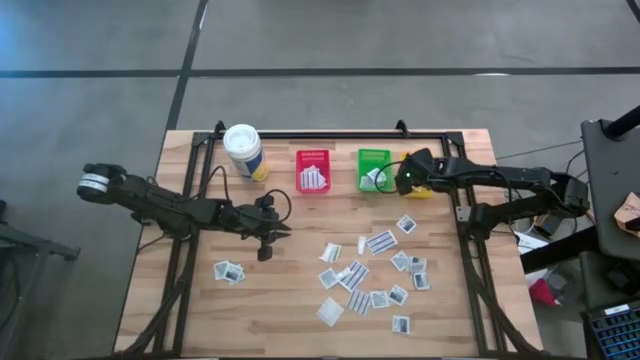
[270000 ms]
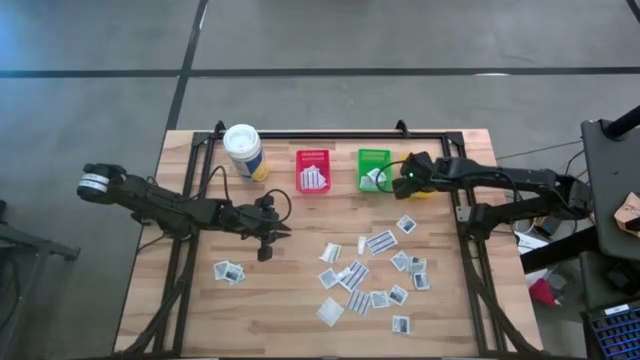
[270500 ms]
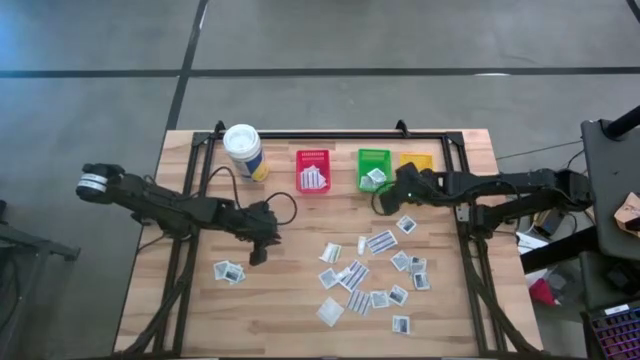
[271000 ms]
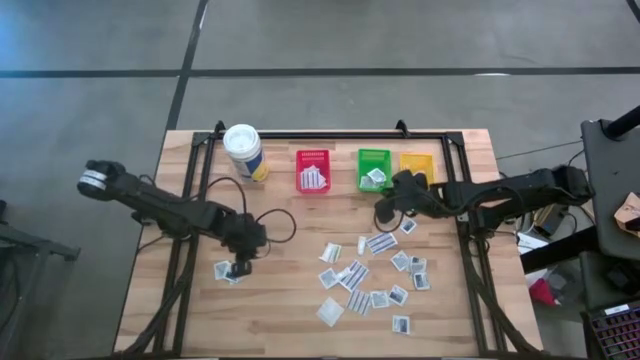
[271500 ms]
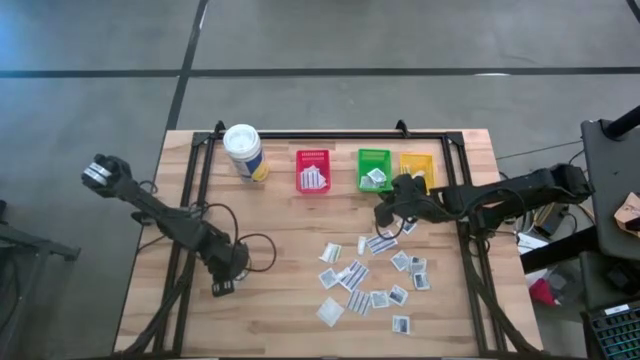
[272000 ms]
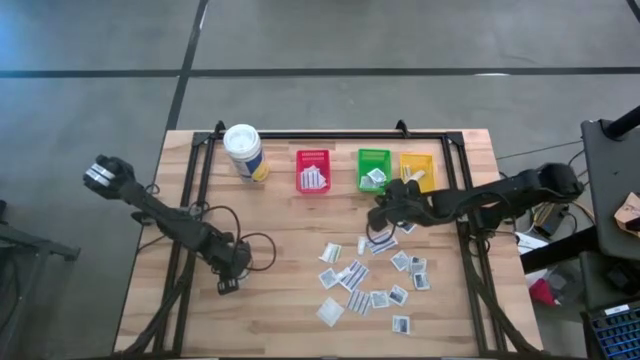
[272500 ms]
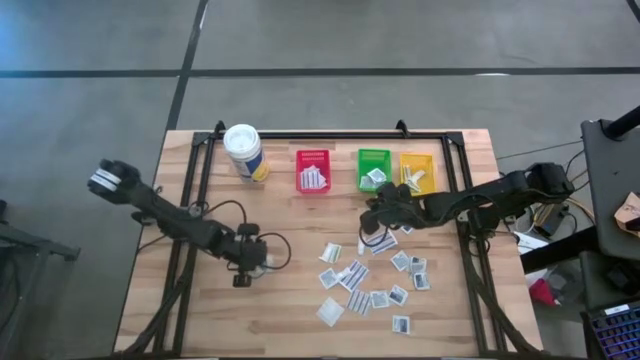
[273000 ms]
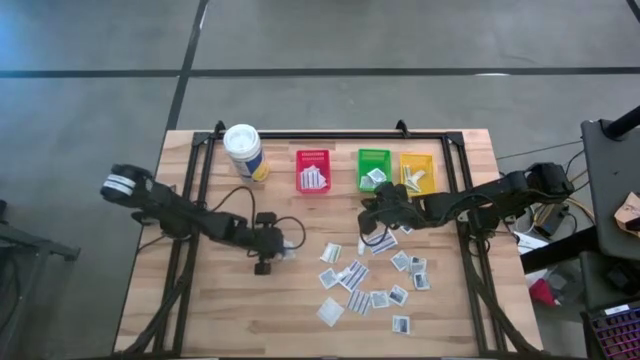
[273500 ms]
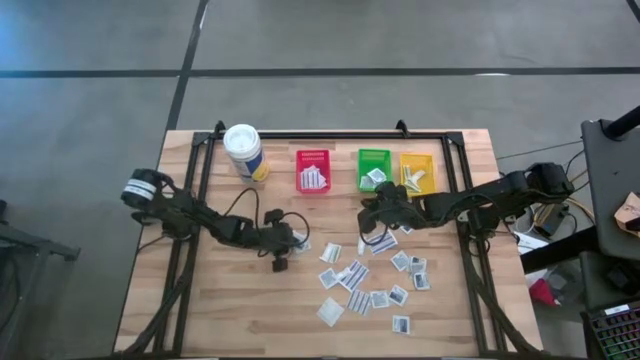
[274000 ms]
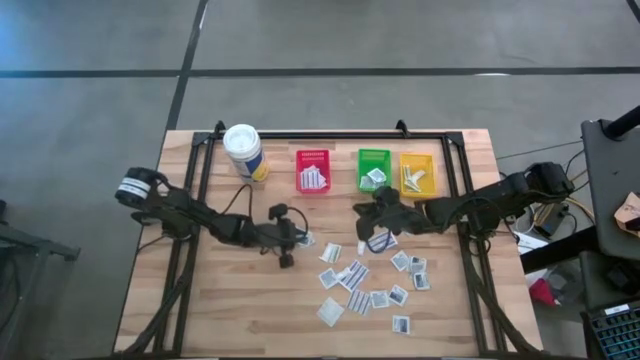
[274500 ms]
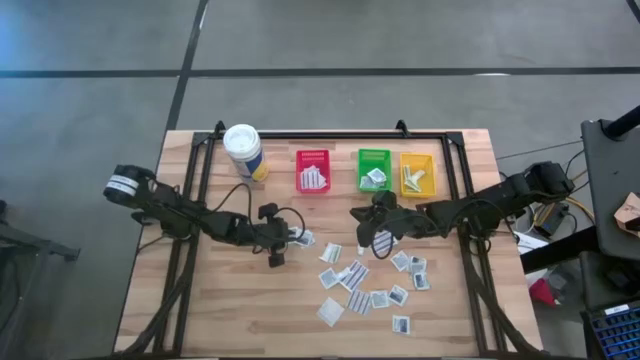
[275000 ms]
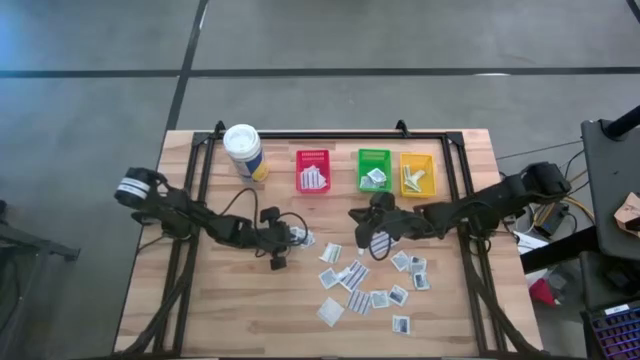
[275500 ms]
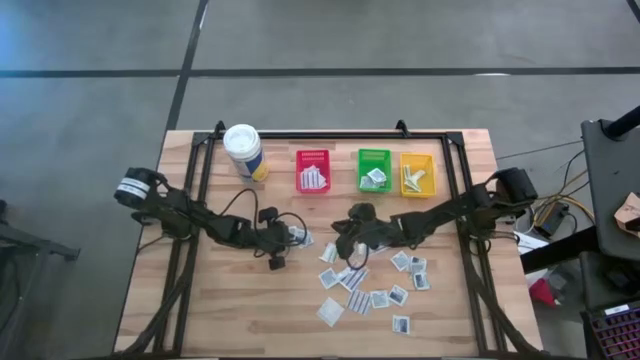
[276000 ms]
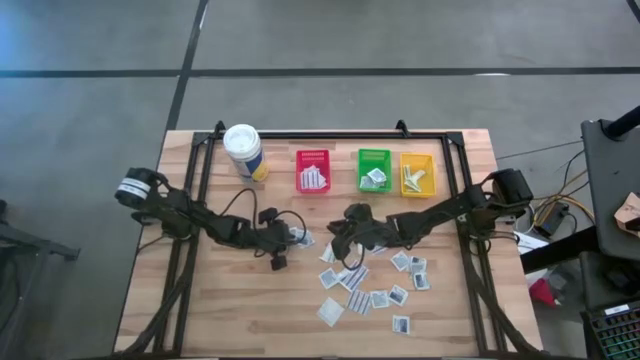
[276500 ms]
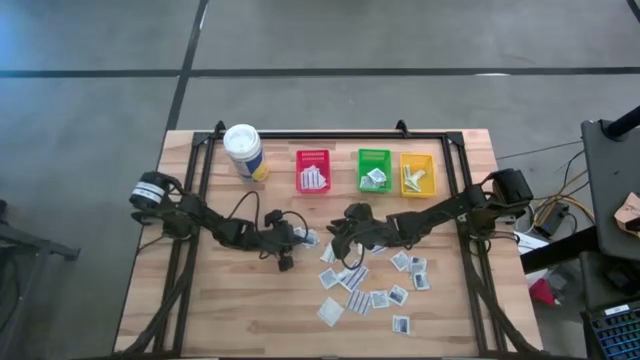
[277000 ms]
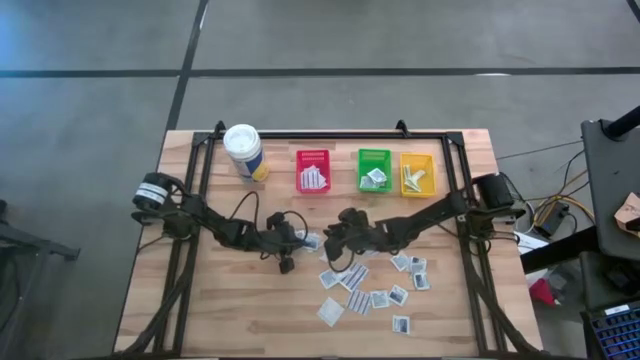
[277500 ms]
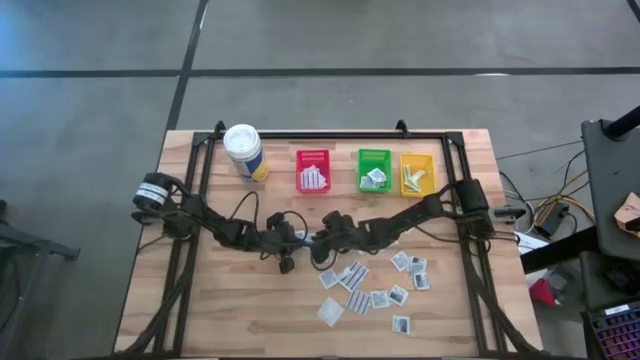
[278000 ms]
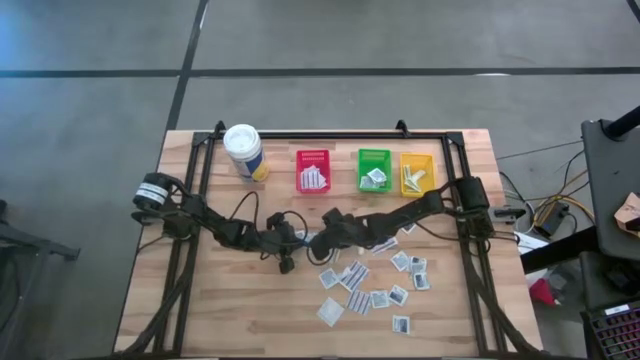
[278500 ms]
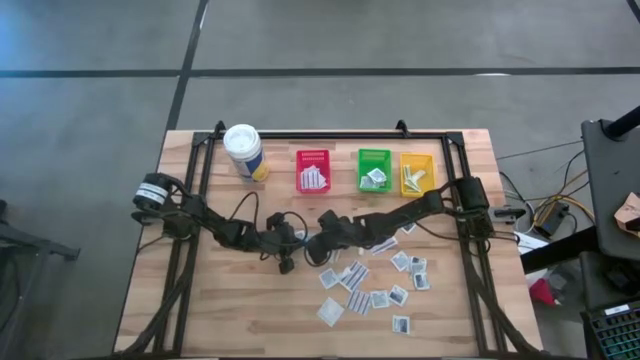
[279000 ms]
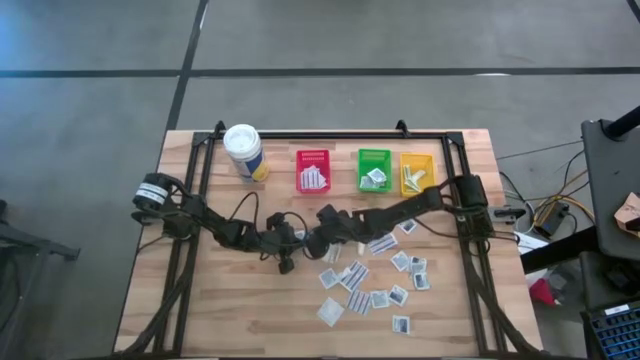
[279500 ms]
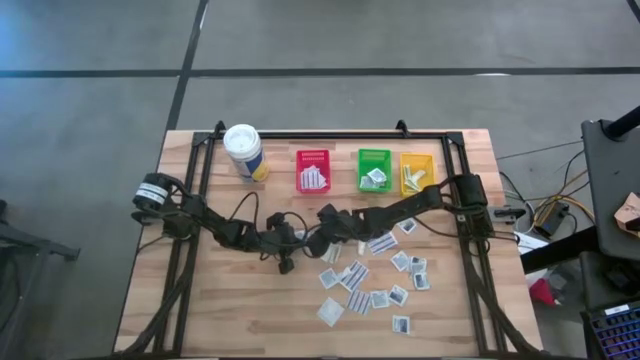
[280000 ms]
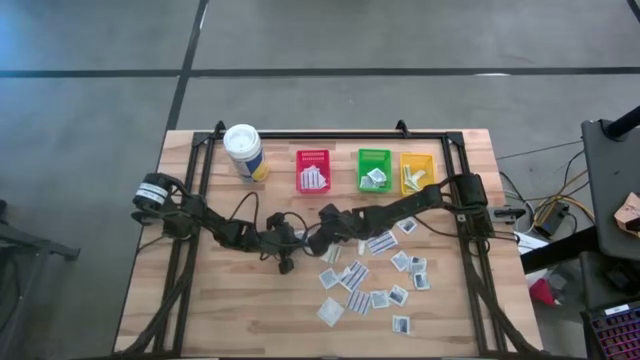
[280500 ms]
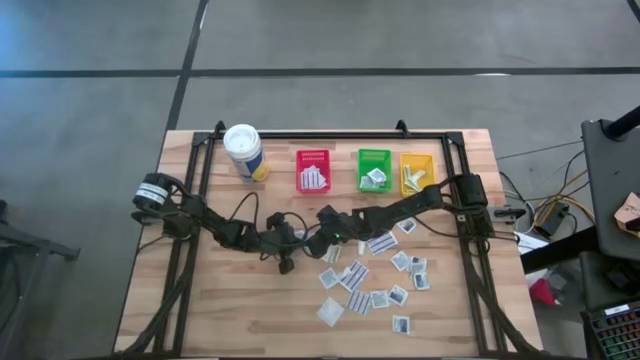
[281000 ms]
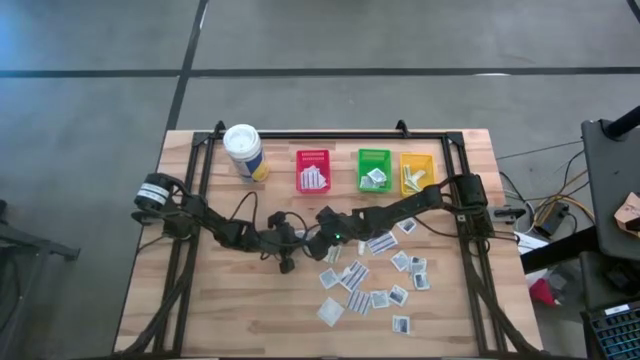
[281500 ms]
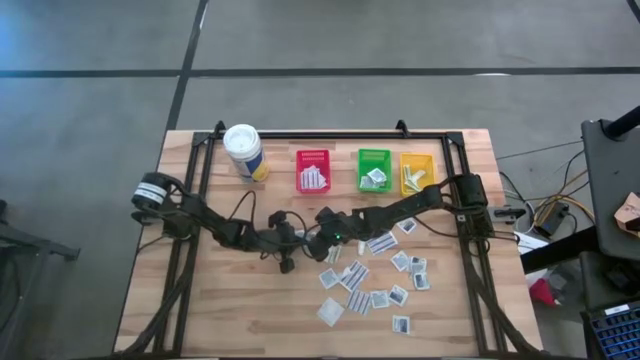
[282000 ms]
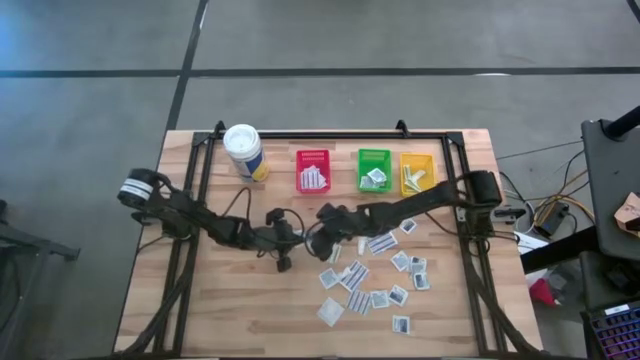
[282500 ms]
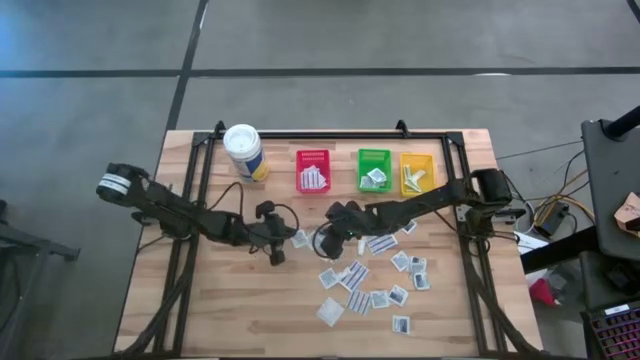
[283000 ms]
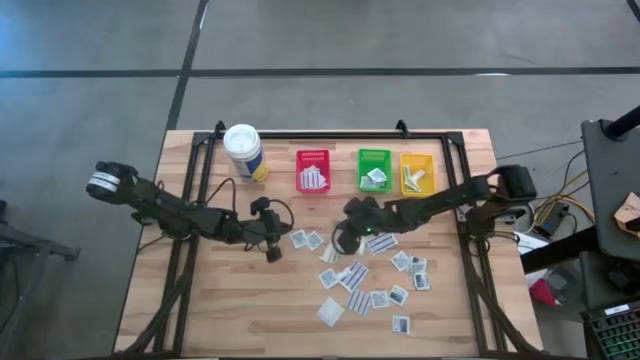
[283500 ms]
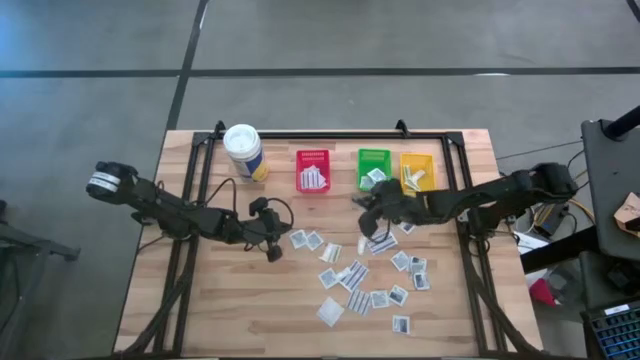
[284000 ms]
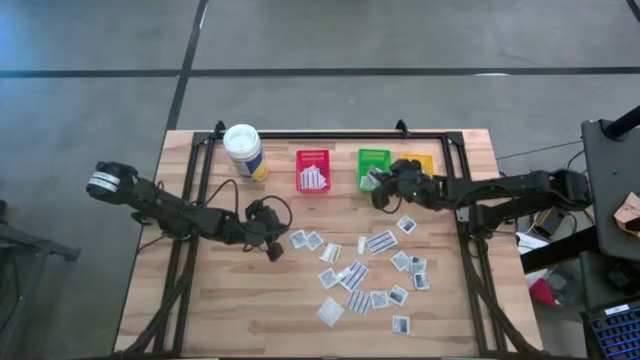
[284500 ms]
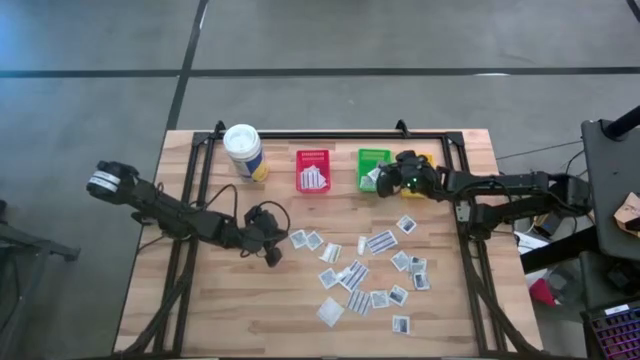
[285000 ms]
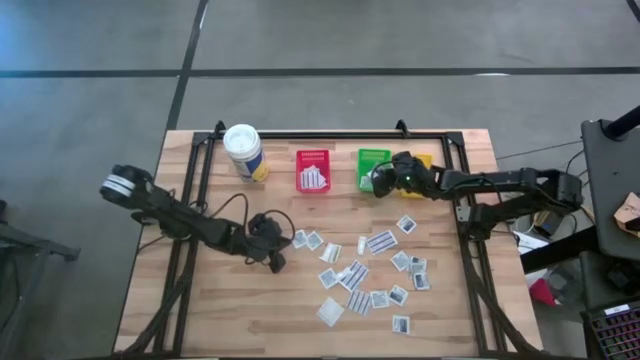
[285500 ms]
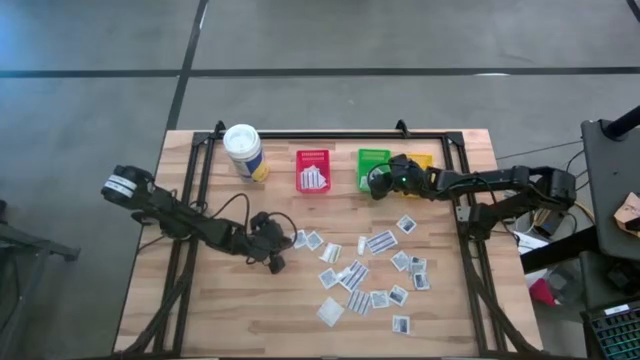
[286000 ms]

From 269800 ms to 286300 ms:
Task: Pick & Place First Aid Supplies
Put the alcohol pad in the green bin

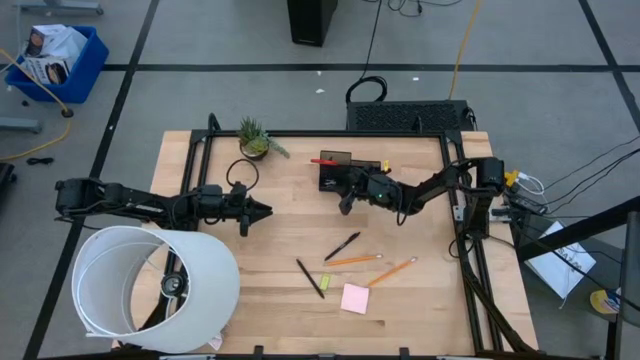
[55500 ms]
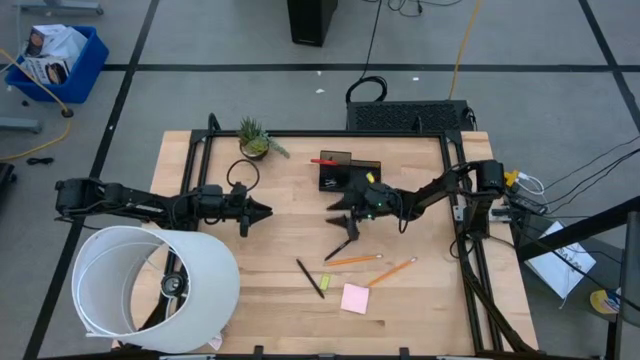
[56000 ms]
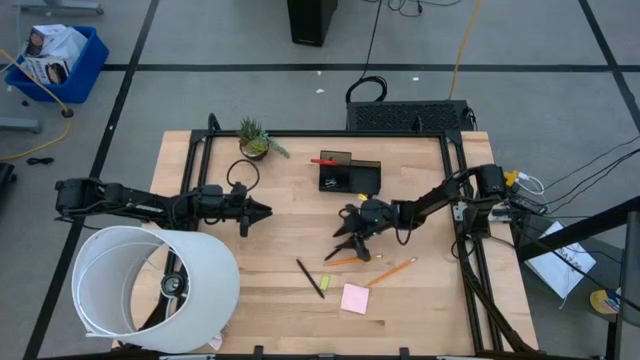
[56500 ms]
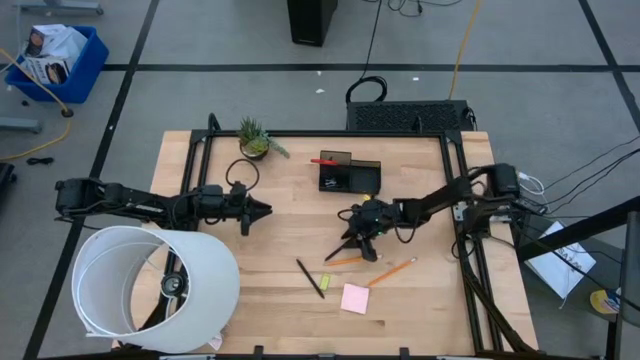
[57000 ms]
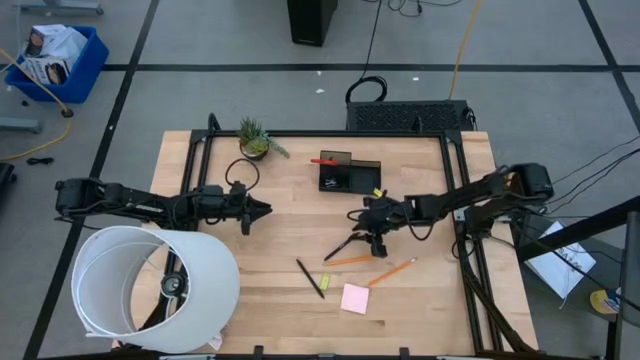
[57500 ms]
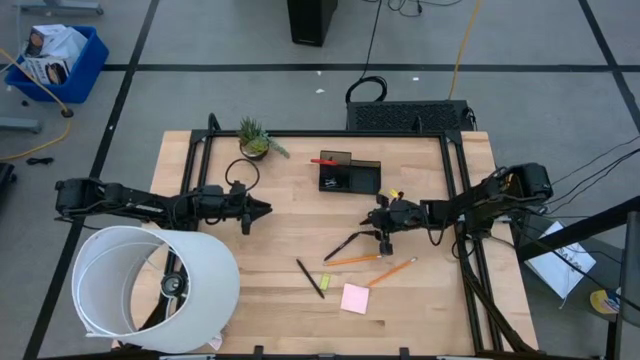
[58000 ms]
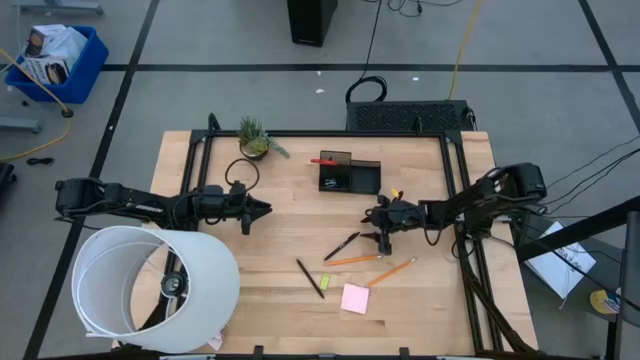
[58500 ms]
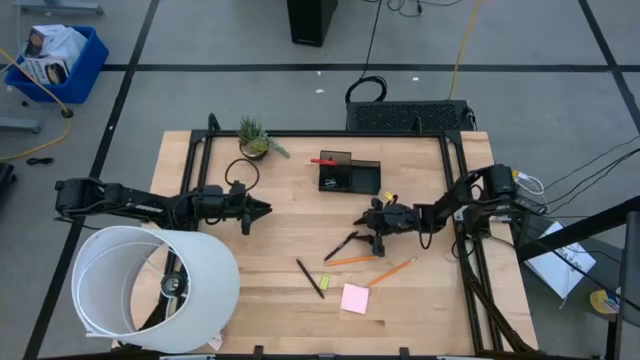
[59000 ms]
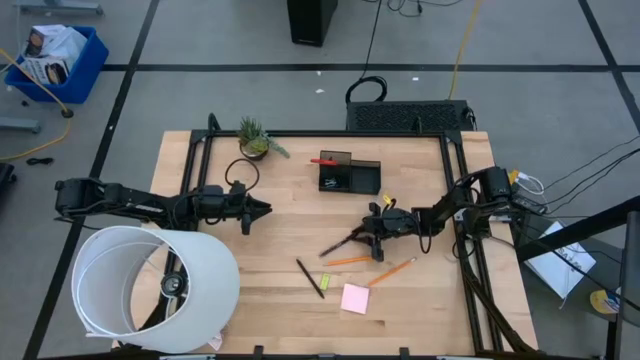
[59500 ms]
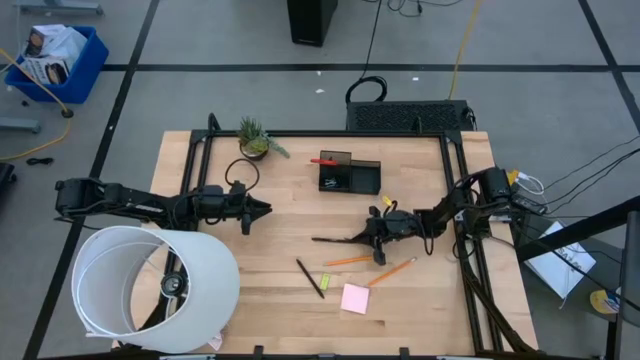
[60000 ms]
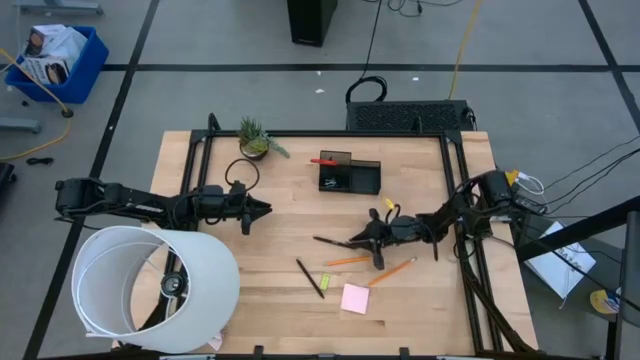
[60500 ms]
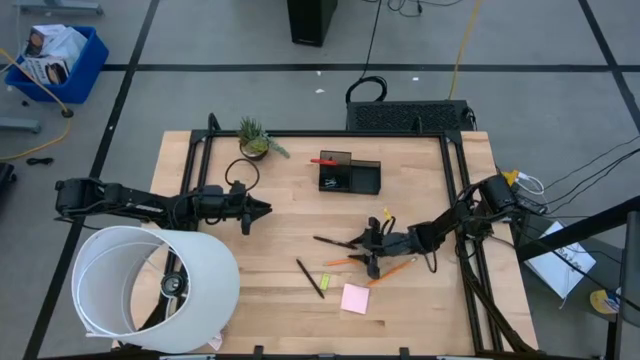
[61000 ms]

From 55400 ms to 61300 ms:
Task: Pick and place office supplies into organizer
Put the black pen into the desk organizer
